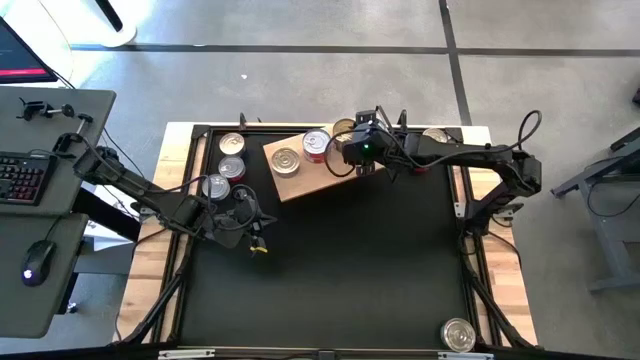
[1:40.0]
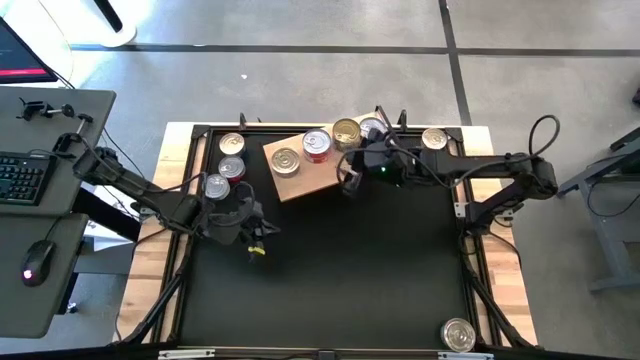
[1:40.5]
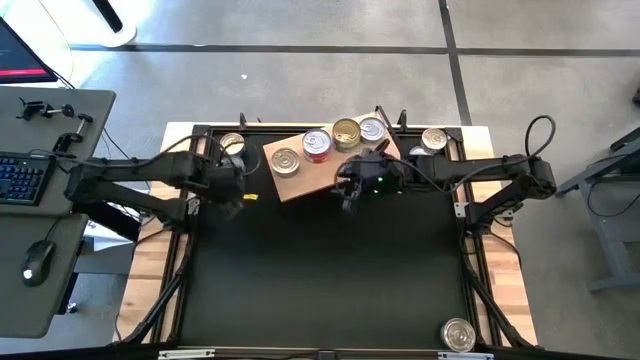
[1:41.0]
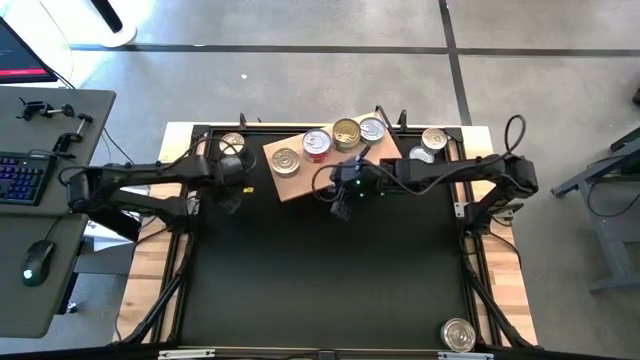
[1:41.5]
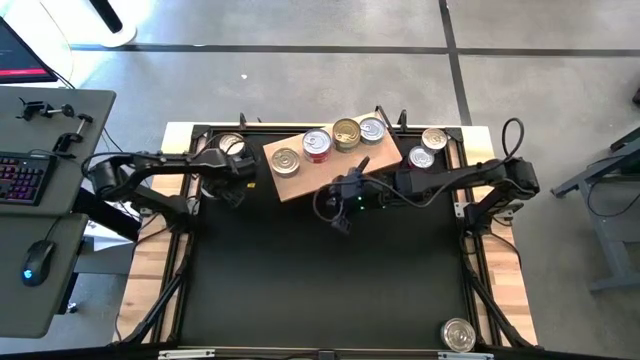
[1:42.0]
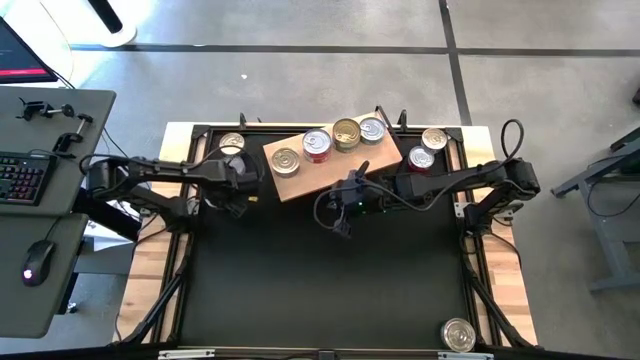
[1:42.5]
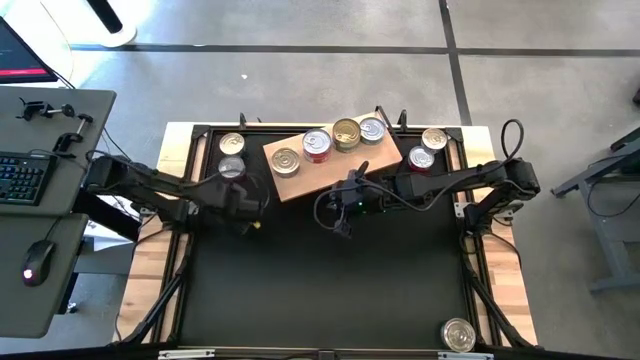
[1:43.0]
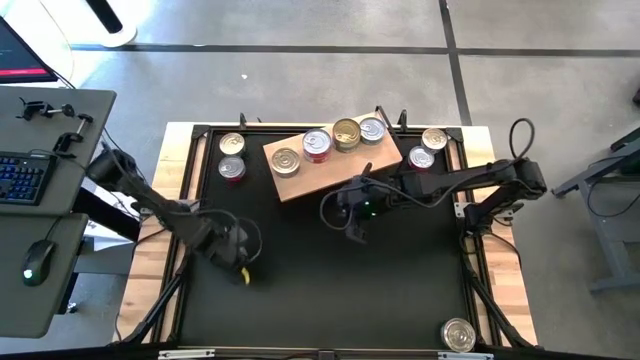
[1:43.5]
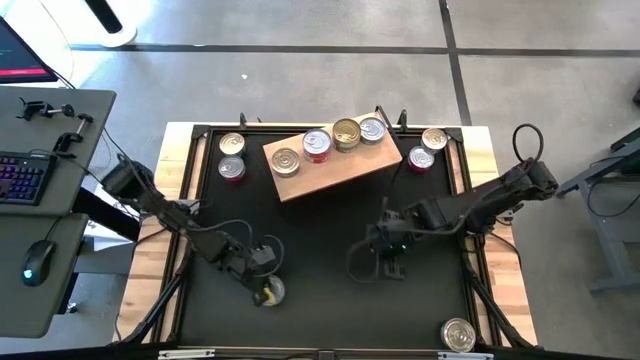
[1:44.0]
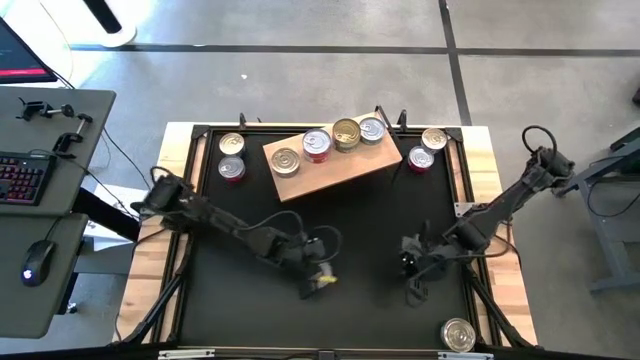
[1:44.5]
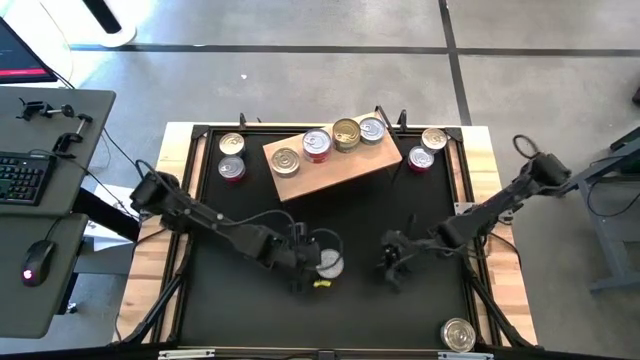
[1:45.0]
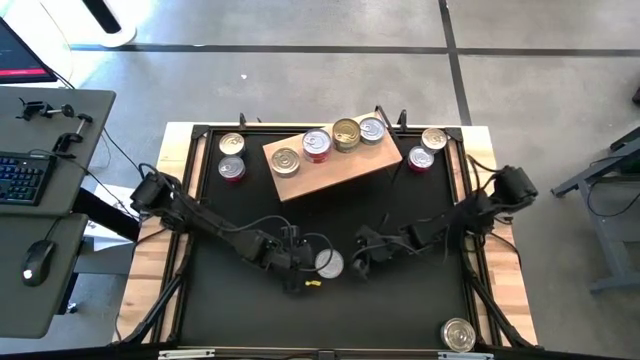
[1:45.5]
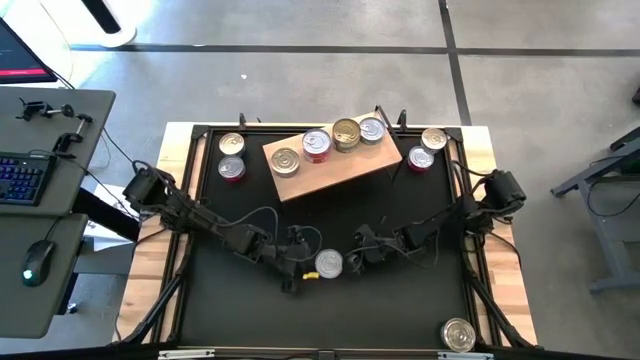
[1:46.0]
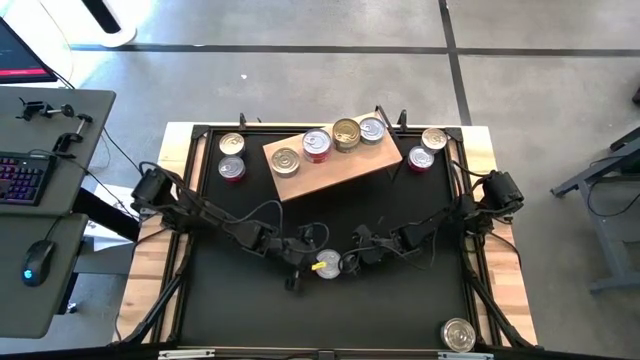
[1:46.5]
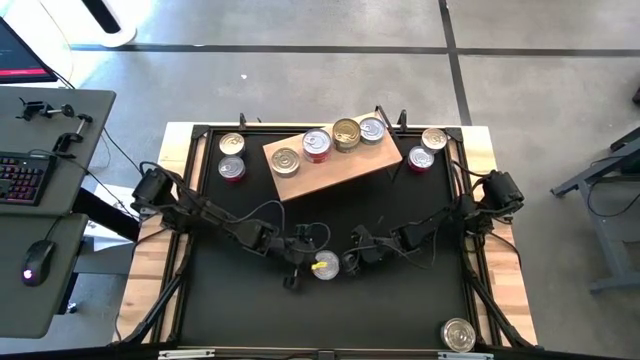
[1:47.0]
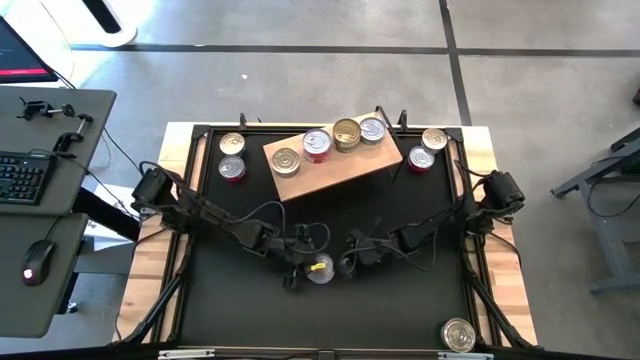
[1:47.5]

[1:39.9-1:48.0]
Task: Stack canned seafood by type on shelf
Stack the silver and green tuna can on top of the silver and green tuna can on the shelf

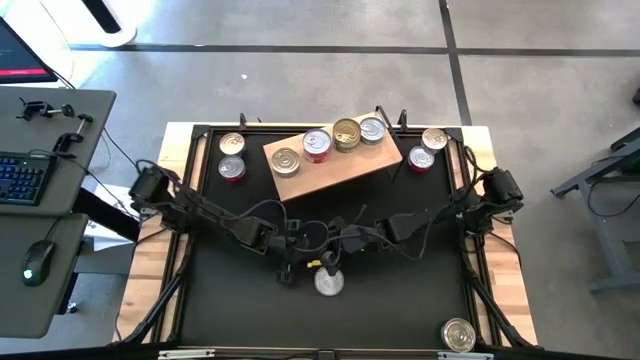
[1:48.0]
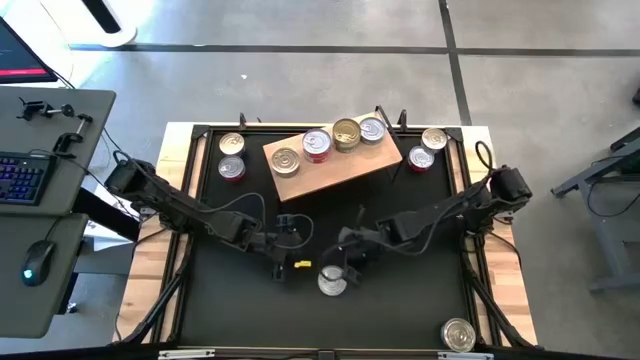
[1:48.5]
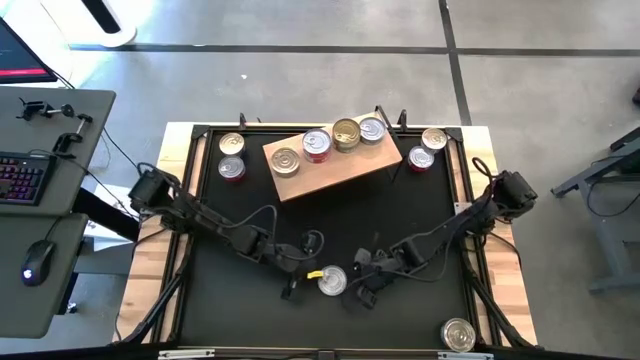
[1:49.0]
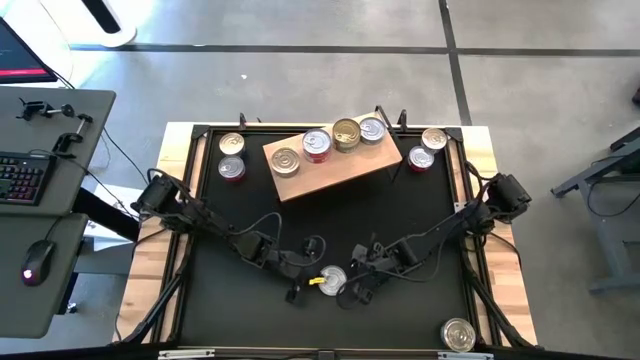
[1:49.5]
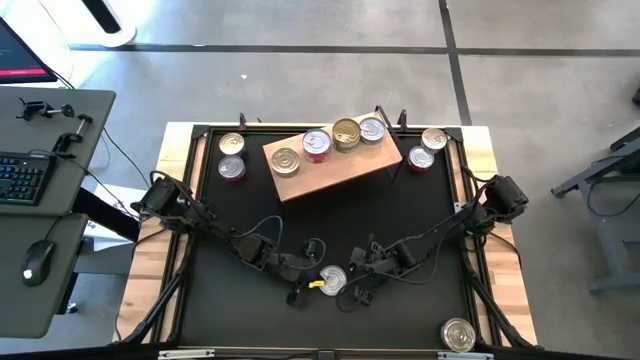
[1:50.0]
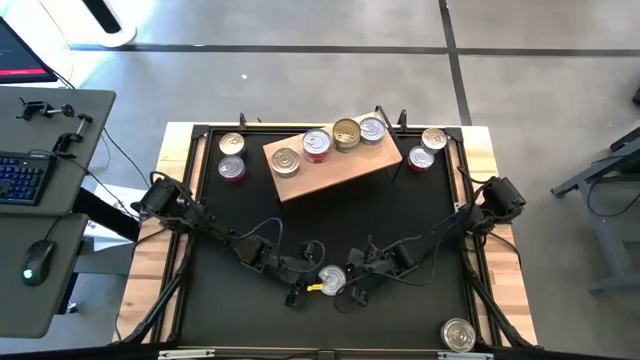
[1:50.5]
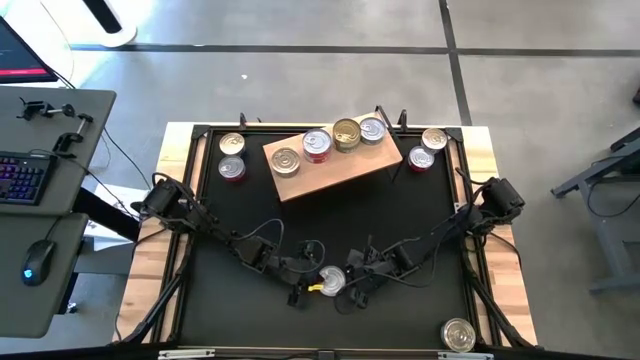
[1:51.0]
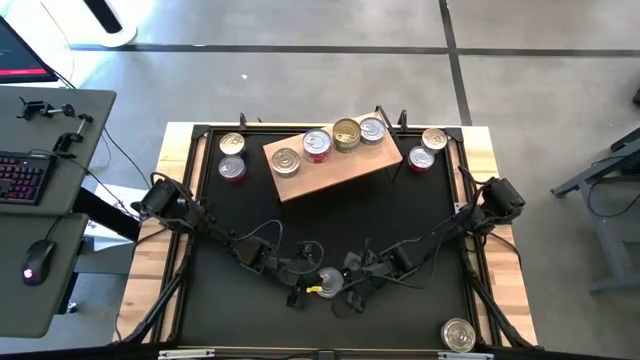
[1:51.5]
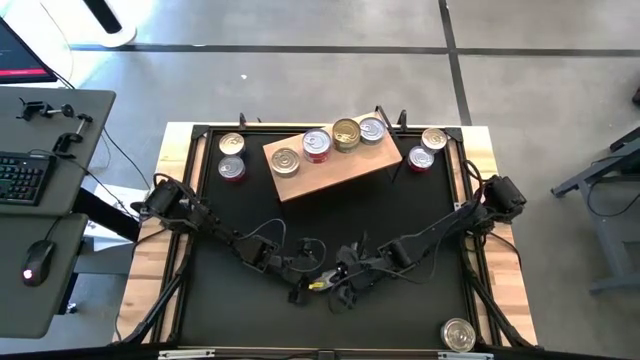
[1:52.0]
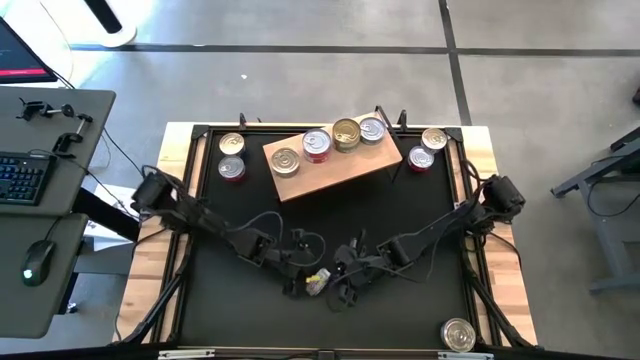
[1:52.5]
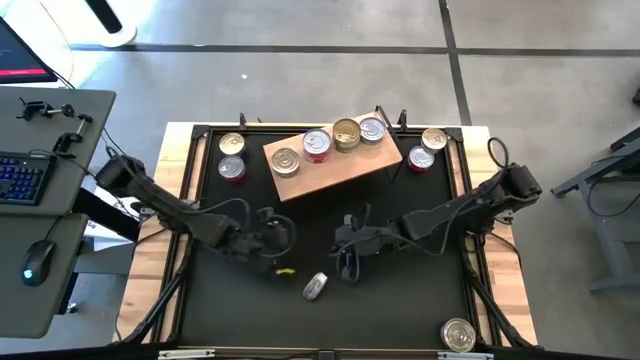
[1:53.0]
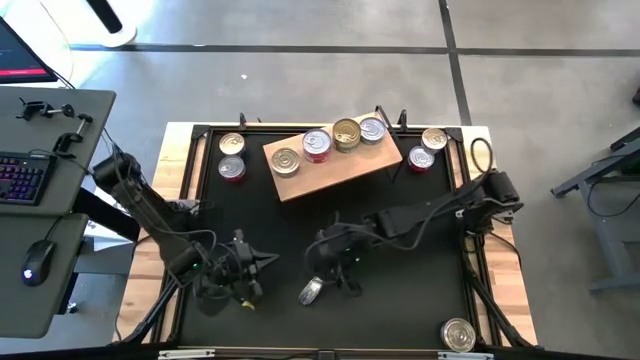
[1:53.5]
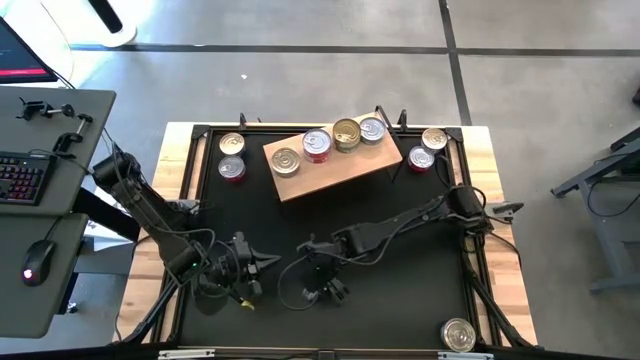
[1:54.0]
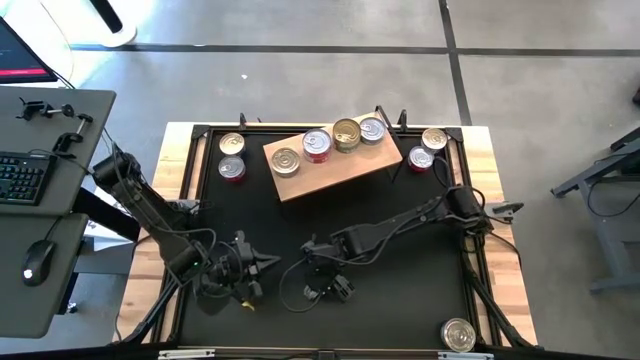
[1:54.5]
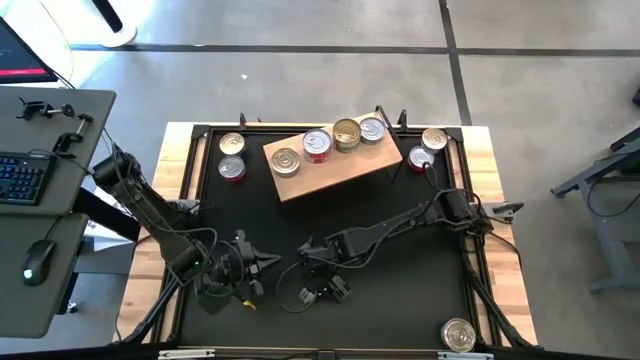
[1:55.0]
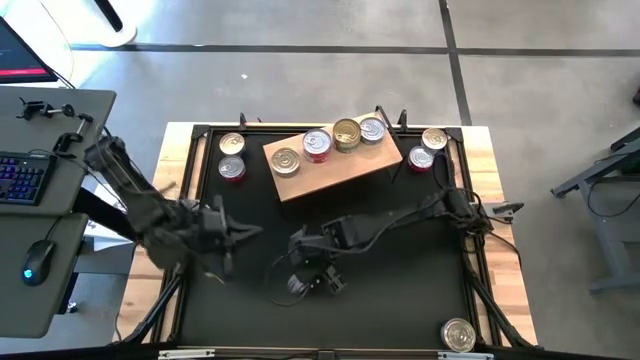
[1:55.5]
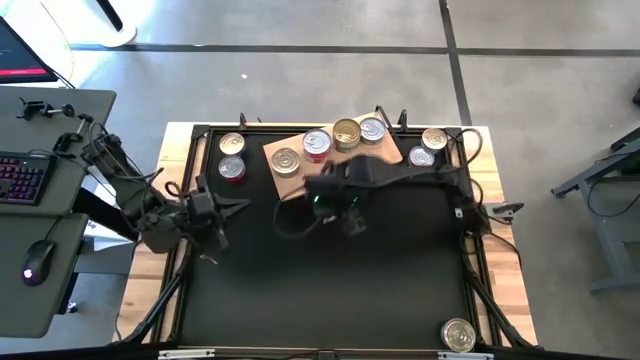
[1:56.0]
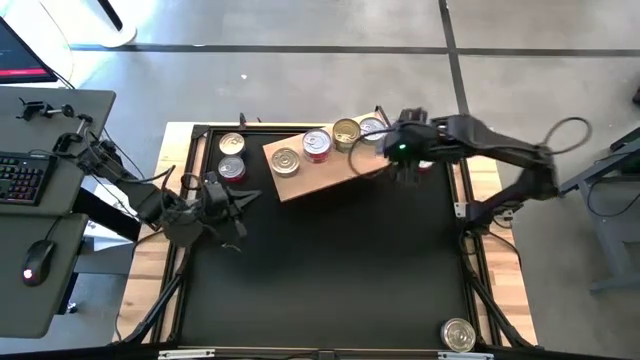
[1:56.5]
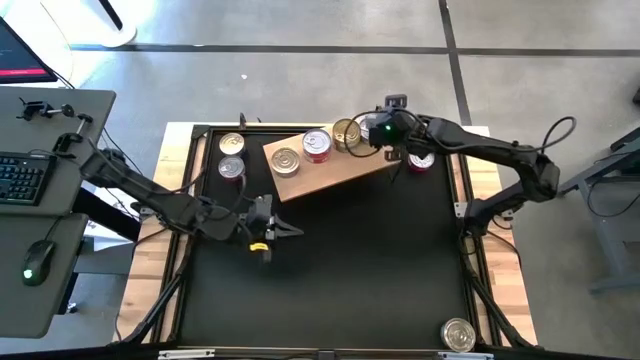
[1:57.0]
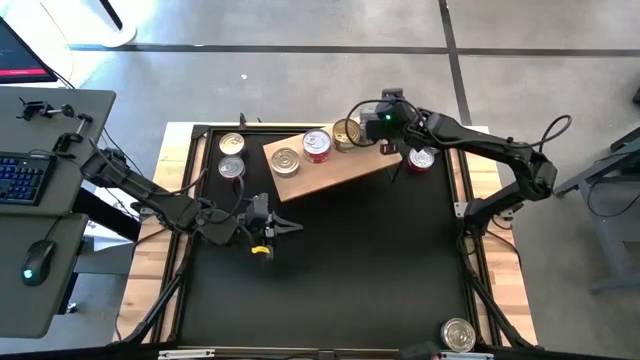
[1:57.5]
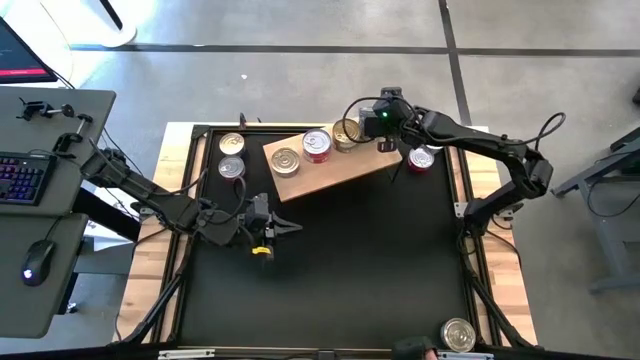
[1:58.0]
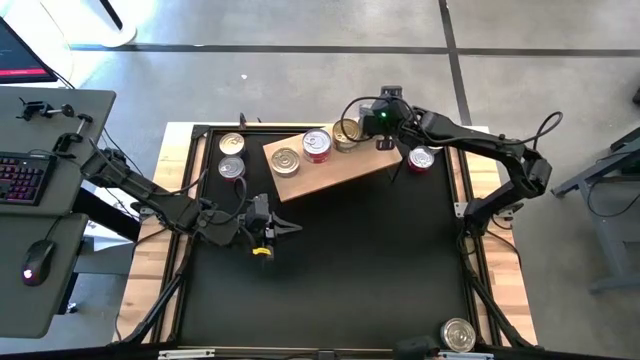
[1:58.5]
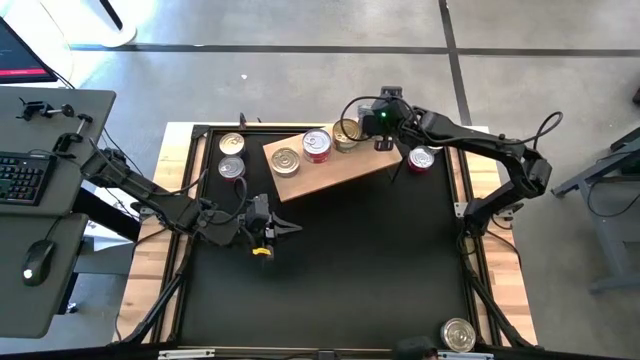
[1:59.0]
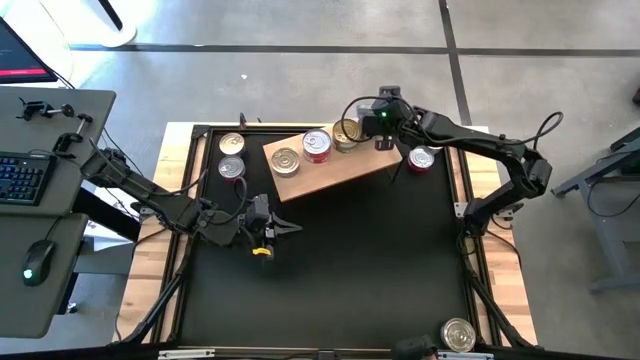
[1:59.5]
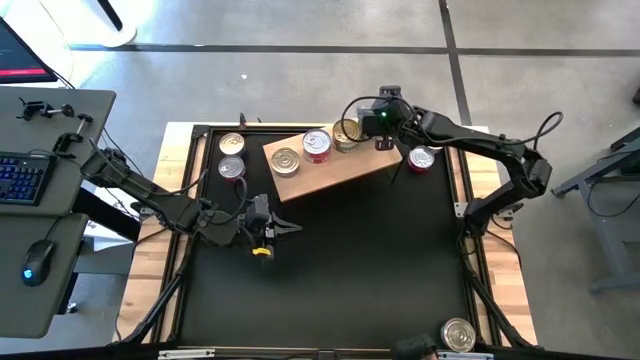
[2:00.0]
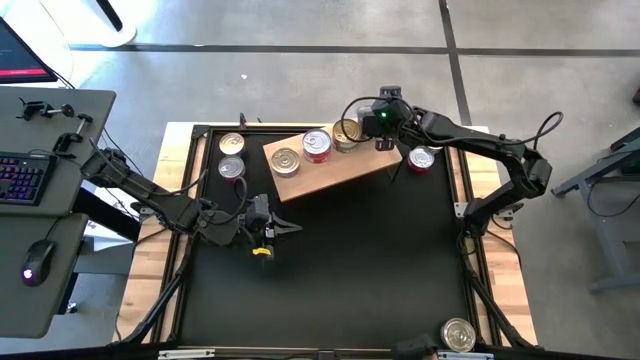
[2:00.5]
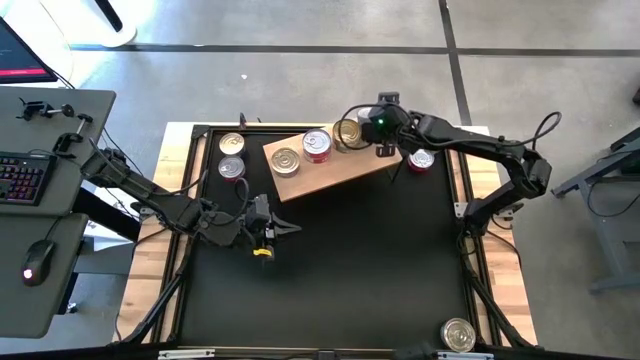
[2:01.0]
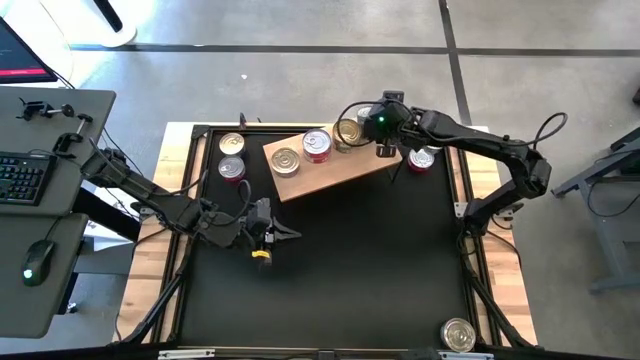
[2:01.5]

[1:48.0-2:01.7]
Stack the silver and green tuna can on top of the silver and green tuna can on the shelf
